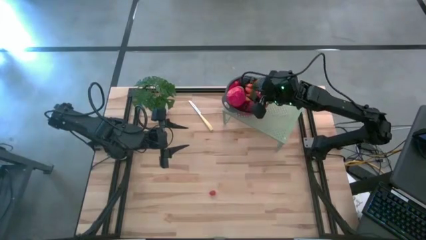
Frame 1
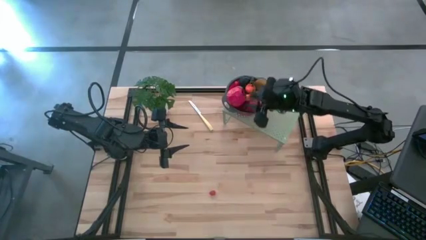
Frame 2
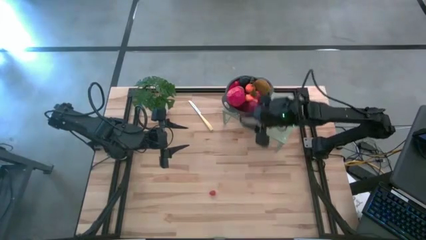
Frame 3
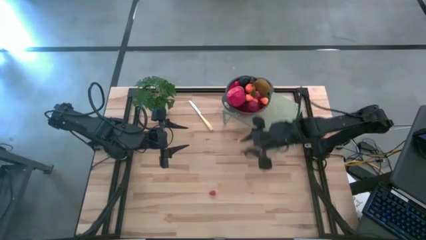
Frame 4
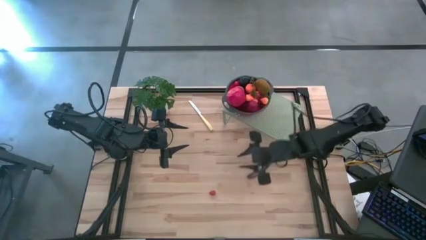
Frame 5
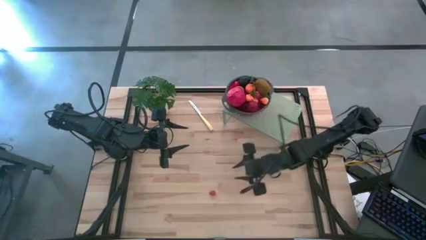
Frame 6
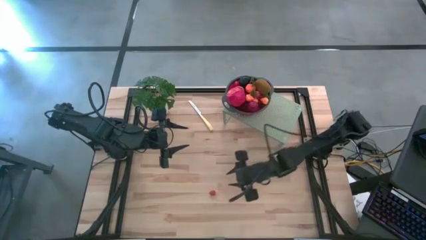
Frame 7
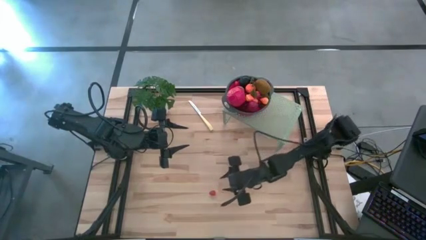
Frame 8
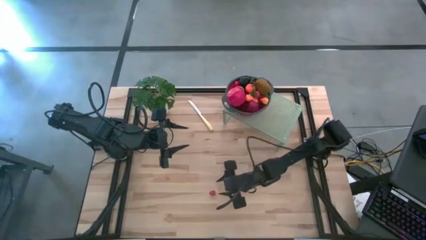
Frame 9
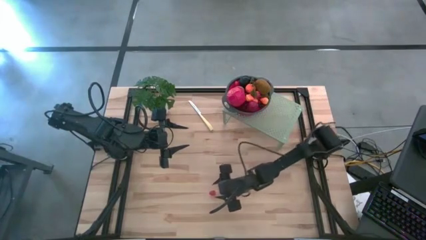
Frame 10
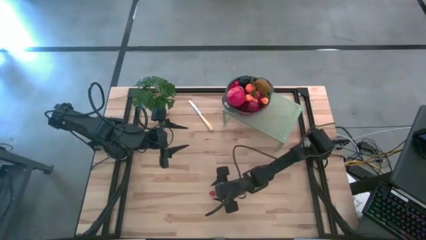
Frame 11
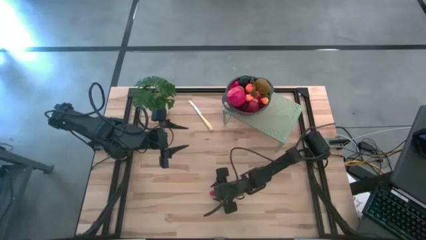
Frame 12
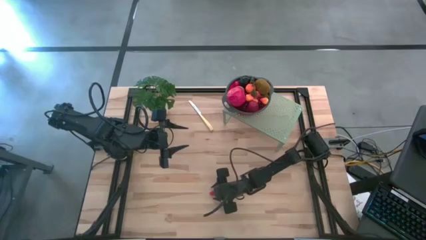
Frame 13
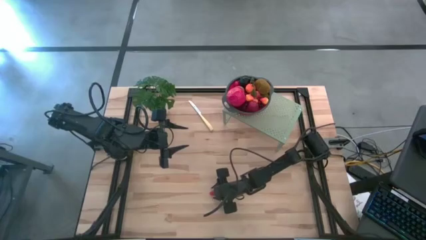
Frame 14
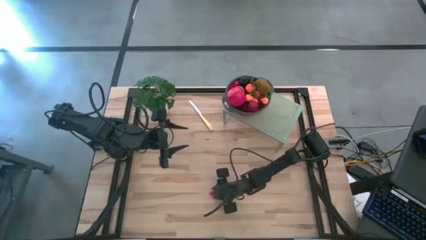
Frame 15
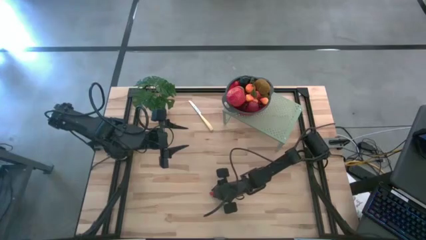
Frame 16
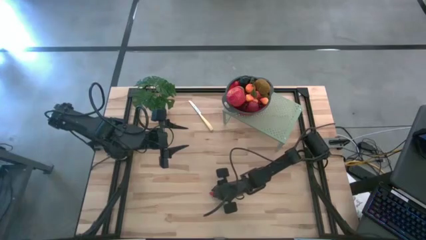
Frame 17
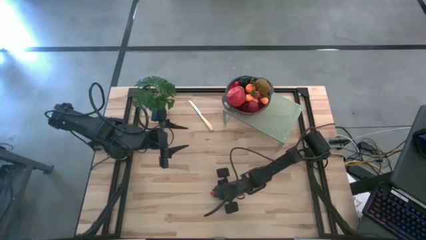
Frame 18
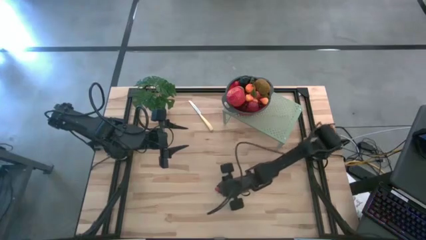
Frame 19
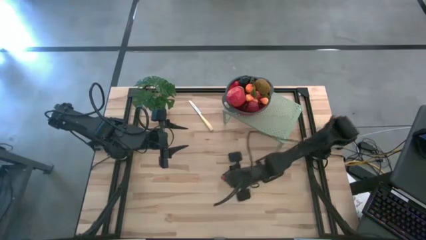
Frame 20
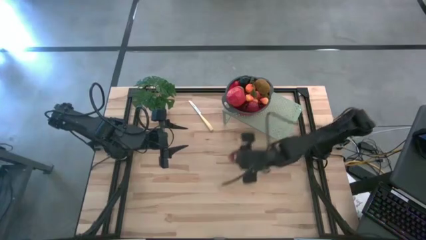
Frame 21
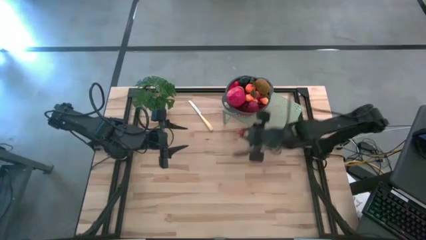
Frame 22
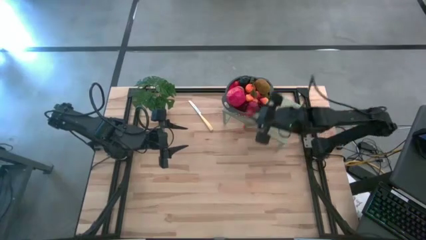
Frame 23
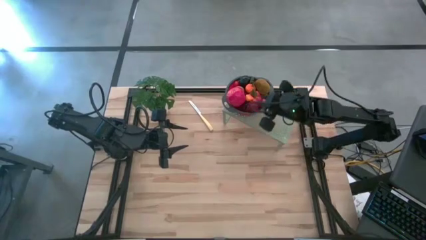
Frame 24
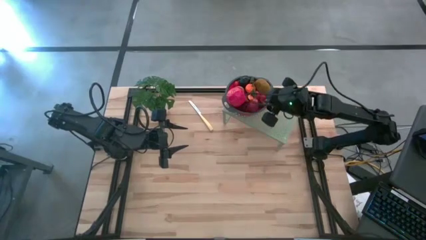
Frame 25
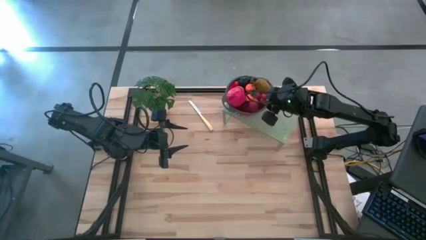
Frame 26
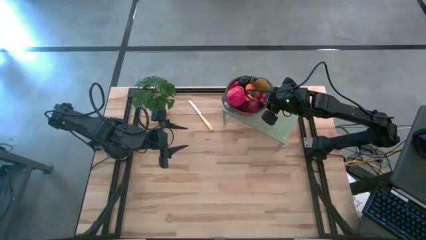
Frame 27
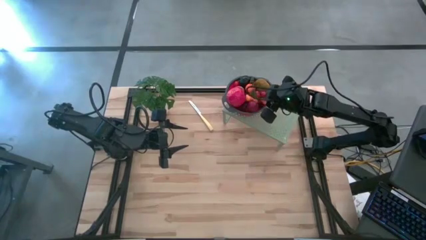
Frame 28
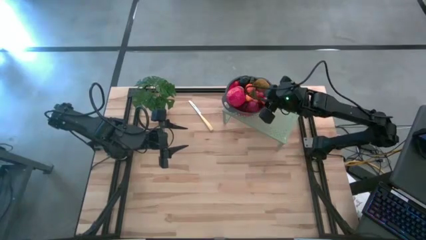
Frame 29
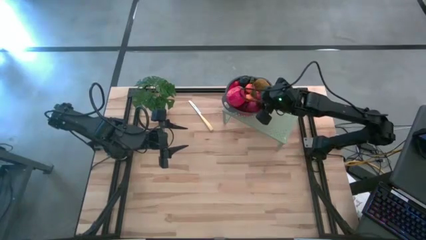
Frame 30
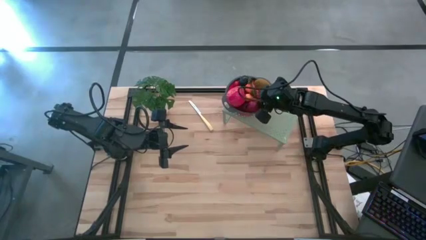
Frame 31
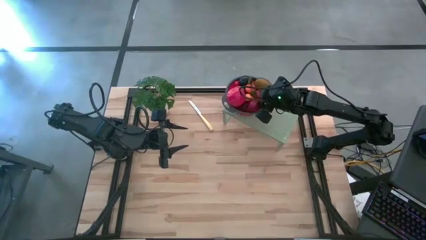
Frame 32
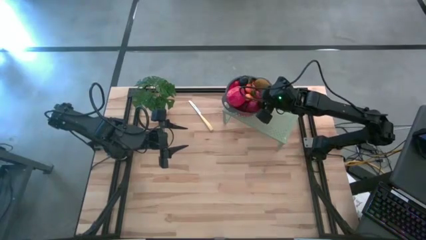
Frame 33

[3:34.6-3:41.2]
Task: Pick & Place Fruit
Put the raspberry into the red gray colander on the shelf

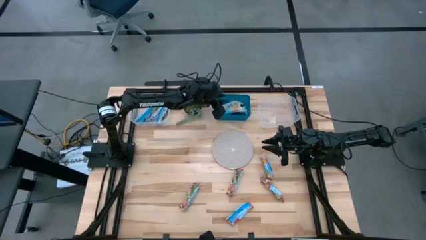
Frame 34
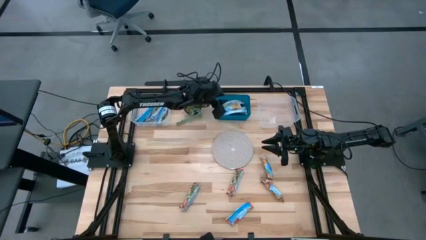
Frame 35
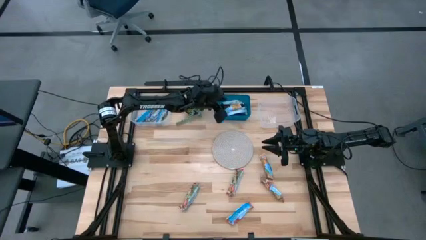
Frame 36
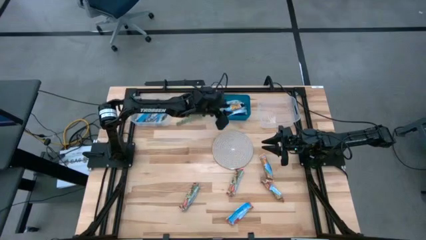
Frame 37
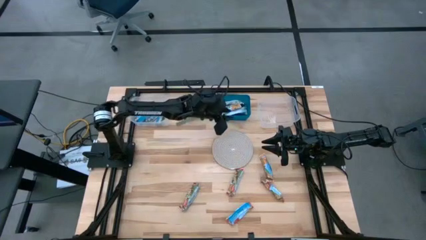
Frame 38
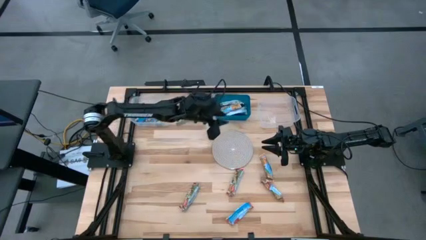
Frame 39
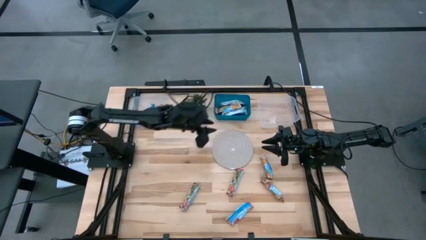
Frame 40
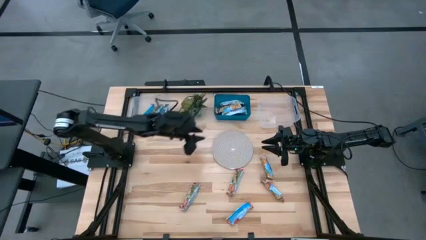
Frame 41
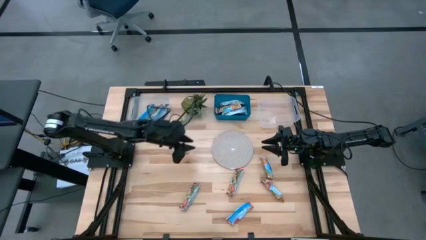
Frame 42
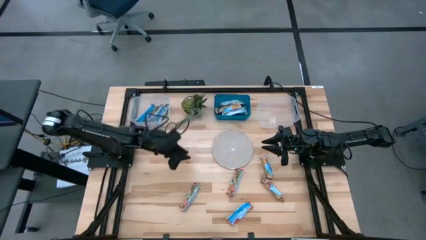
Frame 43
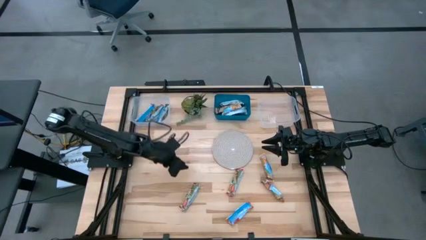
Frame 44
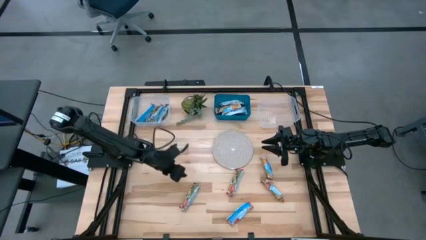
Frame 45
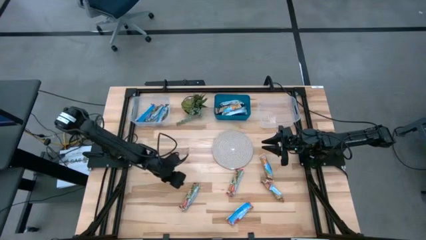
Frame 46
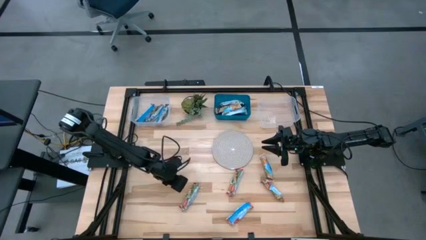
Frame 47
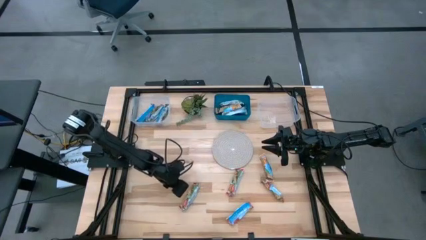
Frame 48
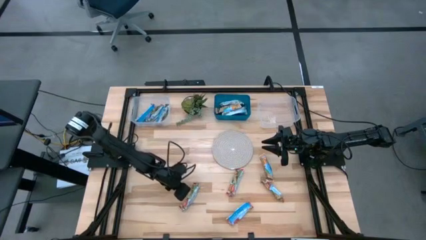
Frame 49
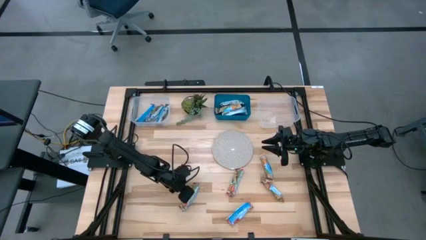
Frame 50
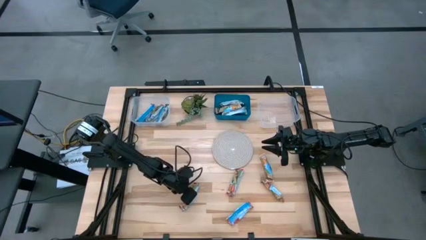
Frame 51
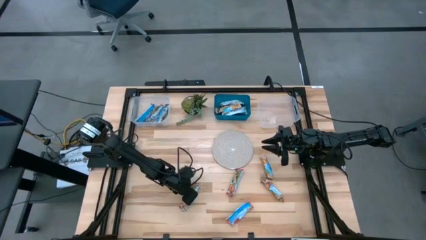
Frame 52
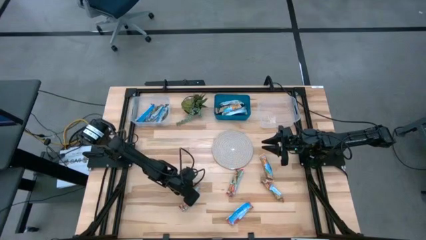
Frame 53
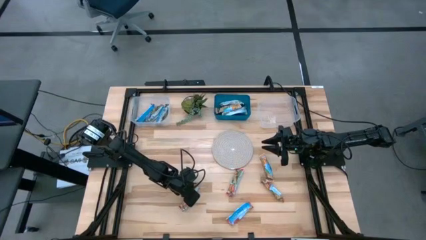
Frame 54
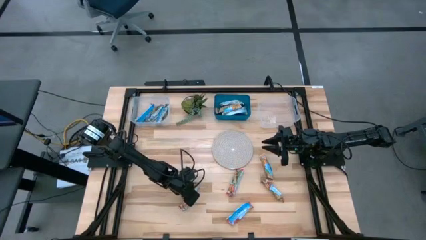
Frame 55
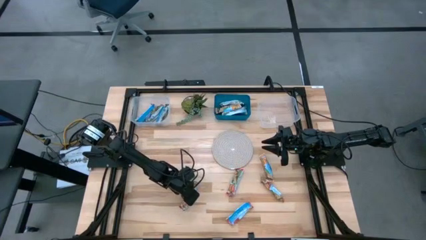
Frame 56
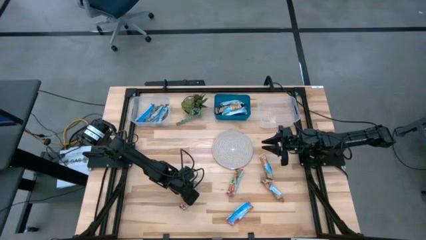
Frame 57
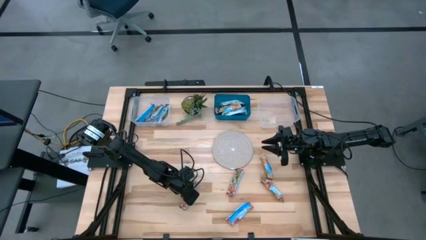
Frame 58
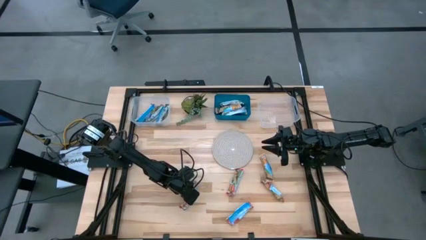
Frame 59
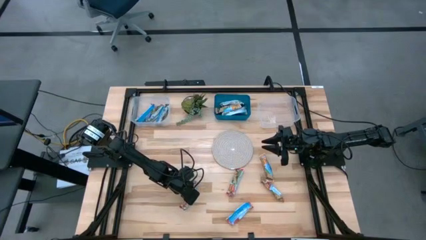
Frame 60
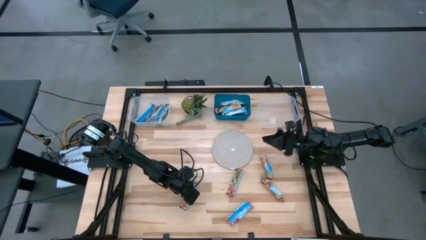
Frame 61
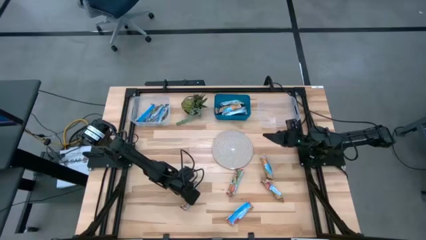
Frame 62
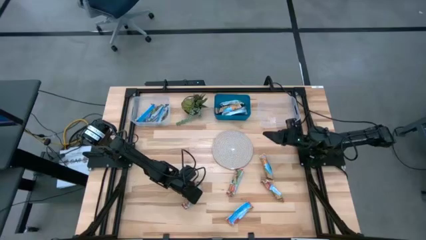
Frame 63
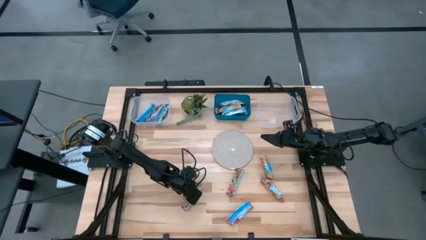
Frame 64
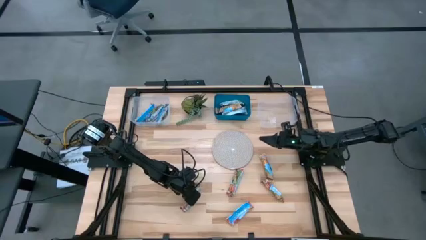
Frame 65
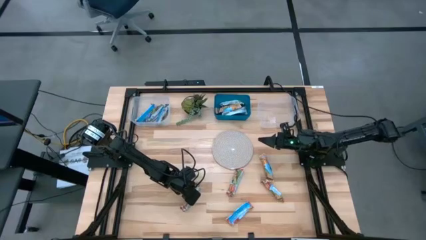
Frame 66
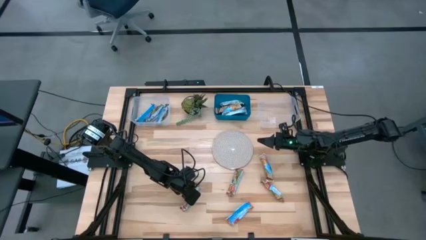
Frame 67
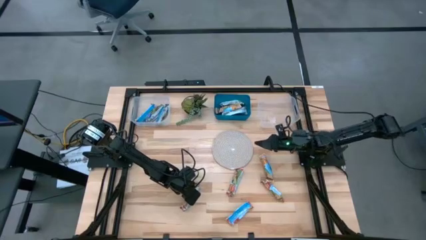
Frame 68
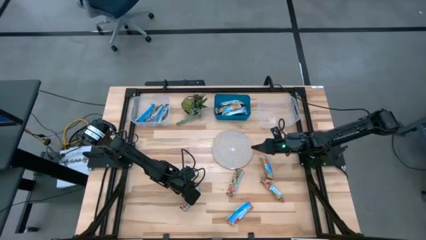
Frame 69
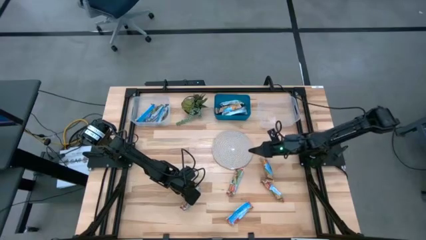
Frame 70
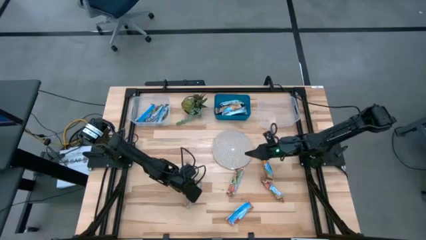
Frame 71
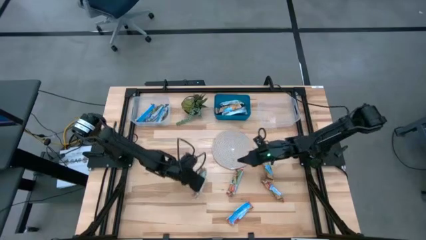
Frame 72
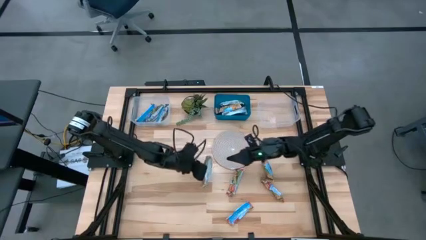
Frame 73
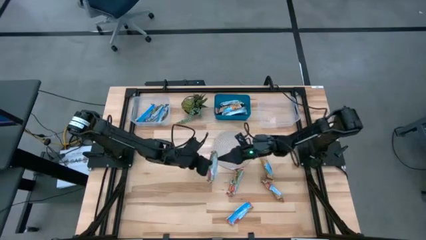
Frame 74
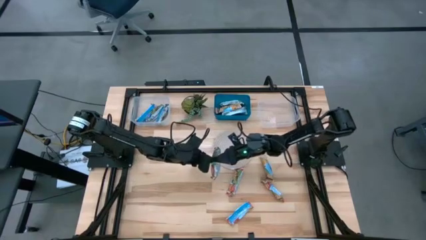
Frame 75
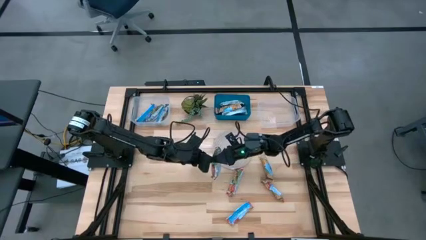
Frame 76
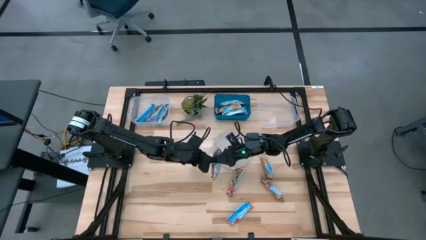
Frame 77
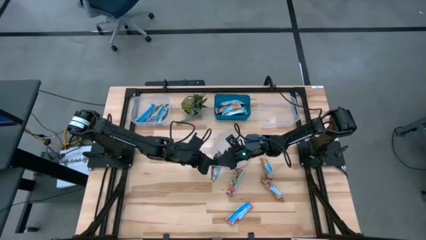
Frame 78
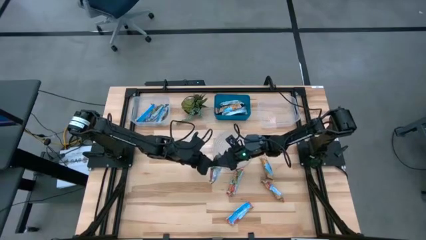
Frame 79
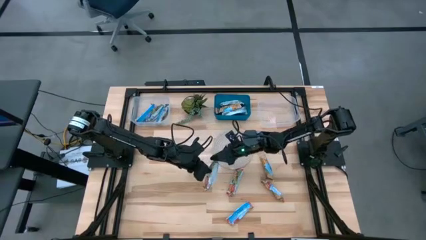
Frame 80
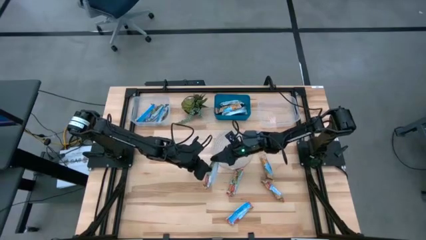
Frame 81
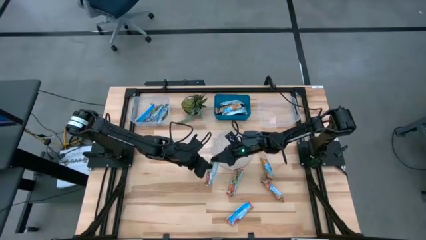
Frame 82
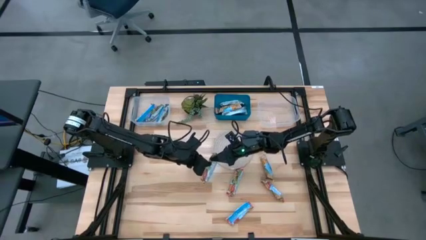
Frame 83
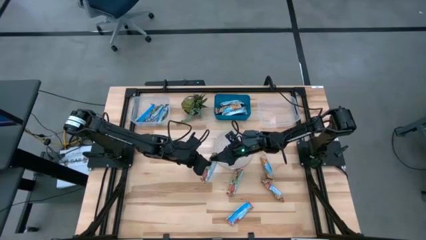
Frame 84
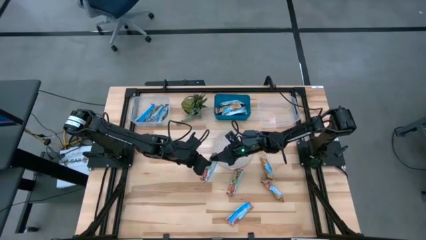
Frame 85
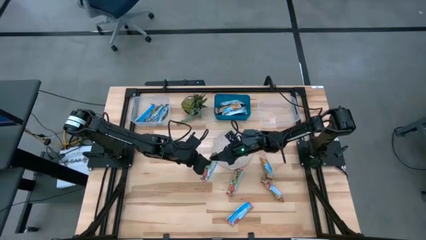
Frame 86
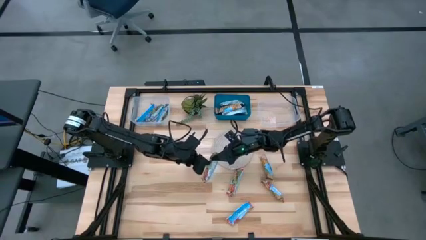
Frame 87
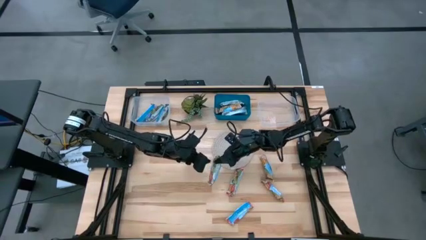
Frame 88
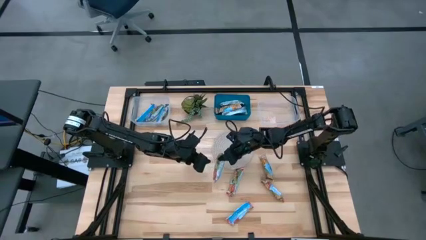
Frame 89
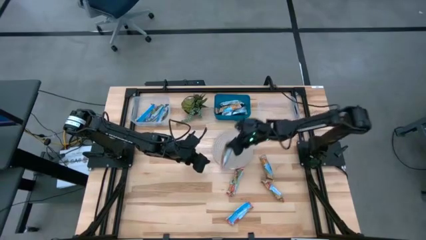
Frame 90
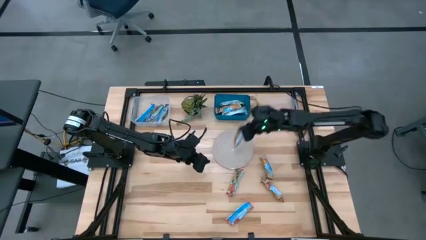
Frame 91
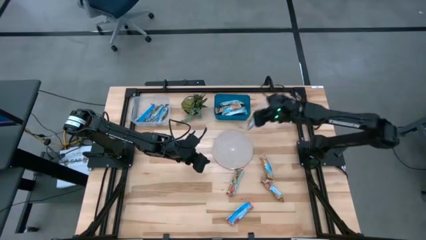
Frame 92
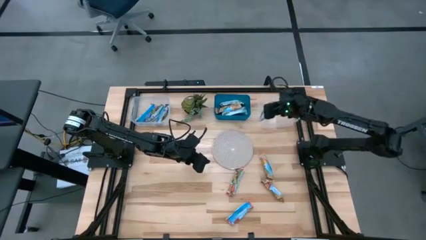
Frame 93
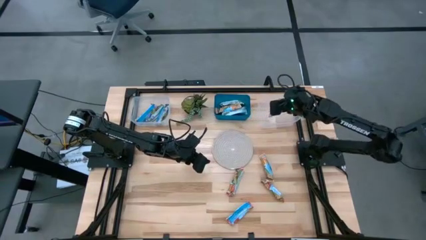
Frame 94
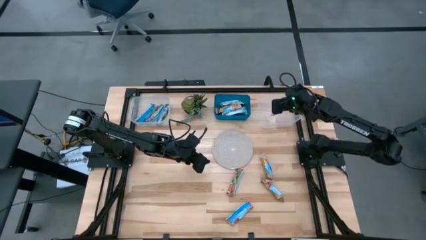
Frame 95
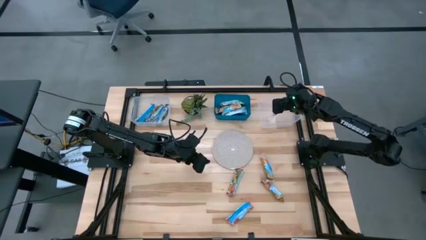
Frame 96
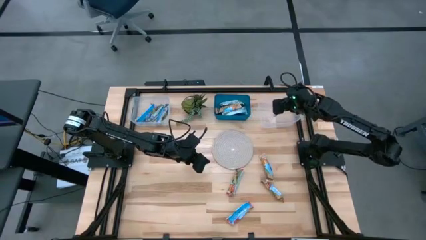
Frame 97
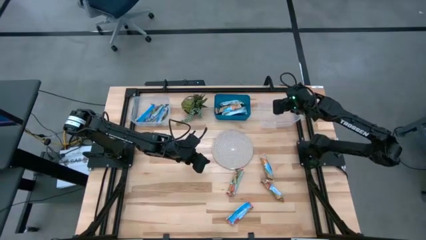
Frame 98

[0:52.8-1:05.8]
Task: Pick and place Granola Bars by type
Put the red granola bar into the right transparent bin
